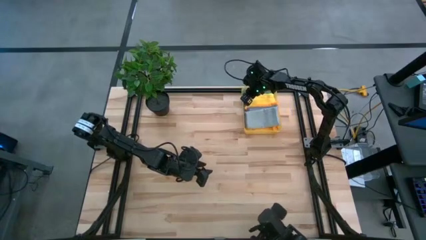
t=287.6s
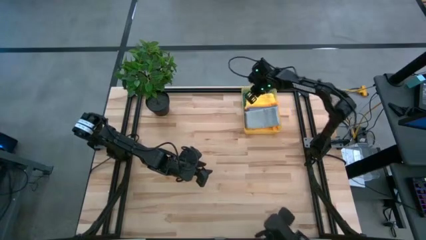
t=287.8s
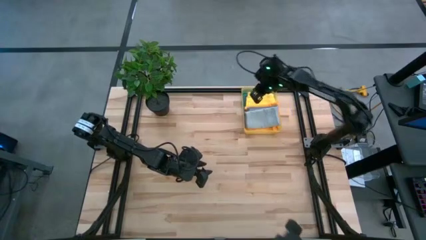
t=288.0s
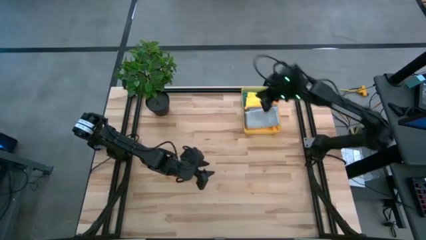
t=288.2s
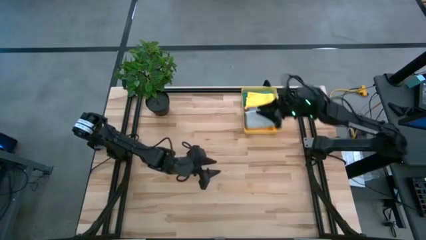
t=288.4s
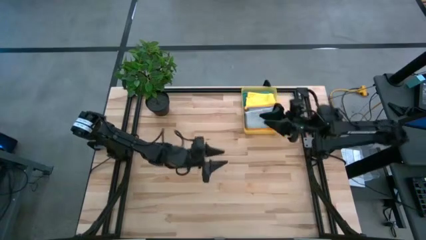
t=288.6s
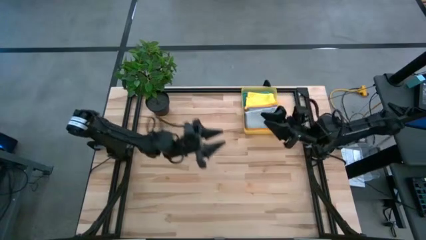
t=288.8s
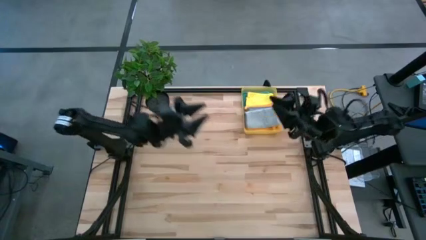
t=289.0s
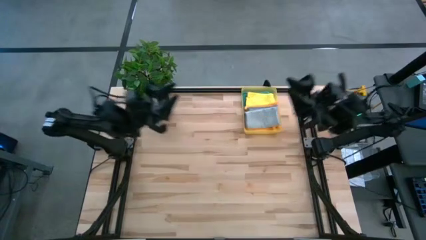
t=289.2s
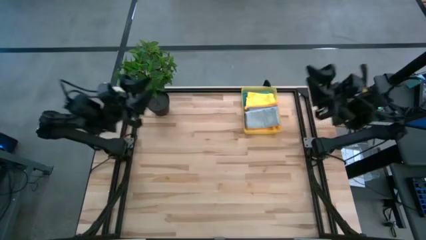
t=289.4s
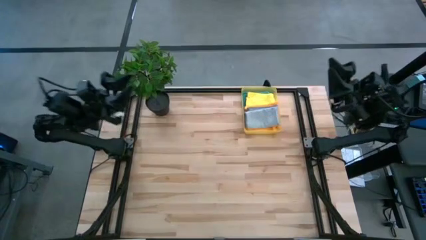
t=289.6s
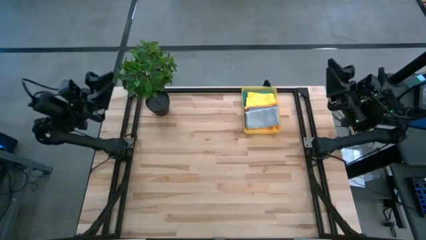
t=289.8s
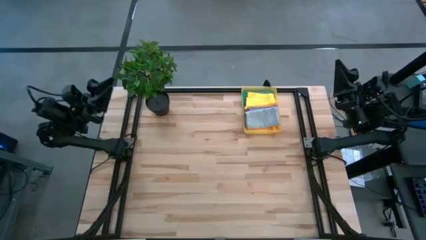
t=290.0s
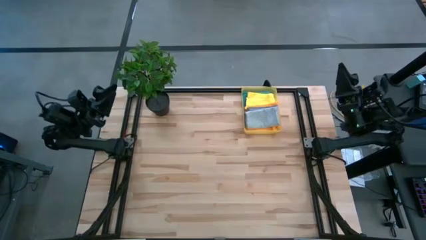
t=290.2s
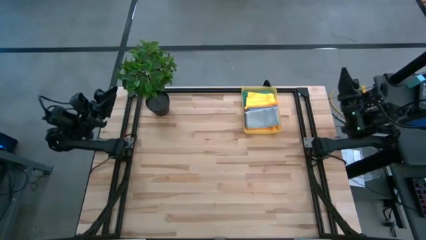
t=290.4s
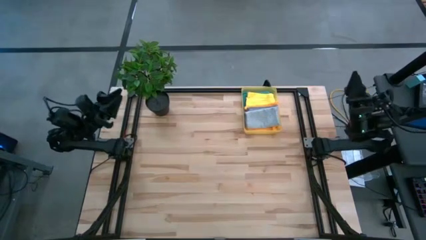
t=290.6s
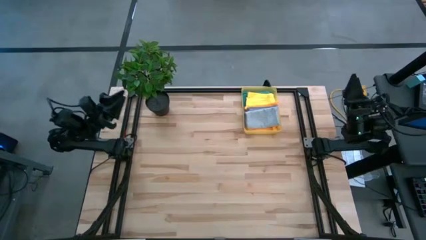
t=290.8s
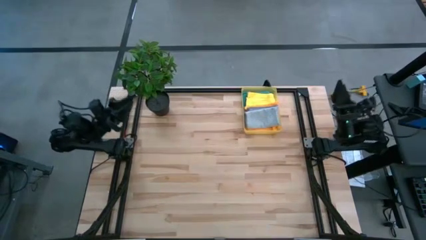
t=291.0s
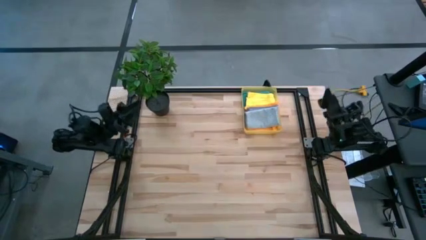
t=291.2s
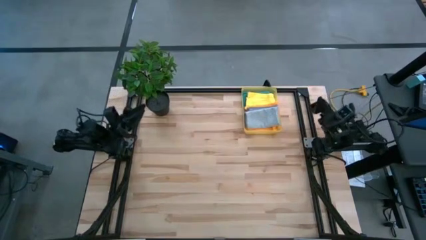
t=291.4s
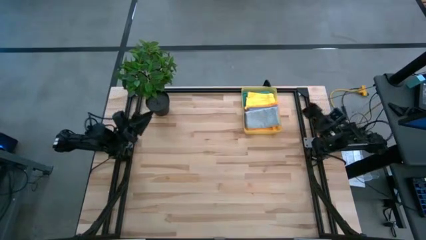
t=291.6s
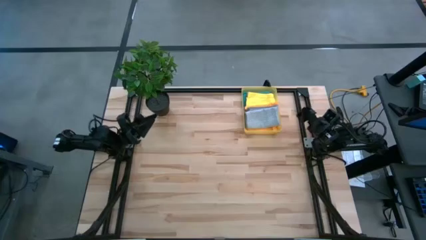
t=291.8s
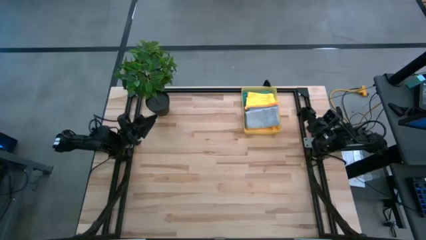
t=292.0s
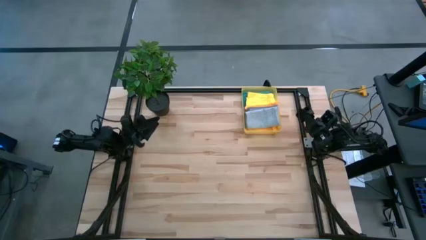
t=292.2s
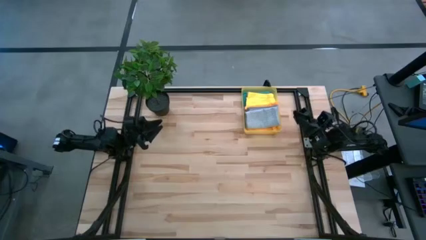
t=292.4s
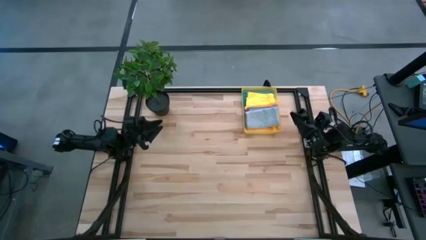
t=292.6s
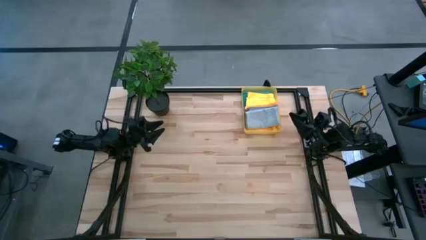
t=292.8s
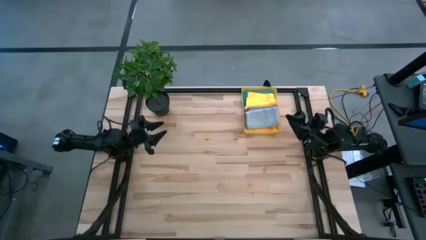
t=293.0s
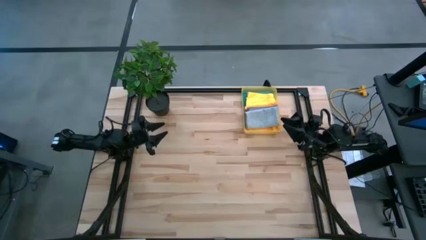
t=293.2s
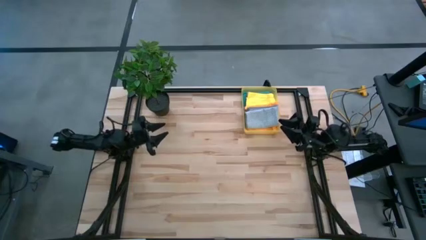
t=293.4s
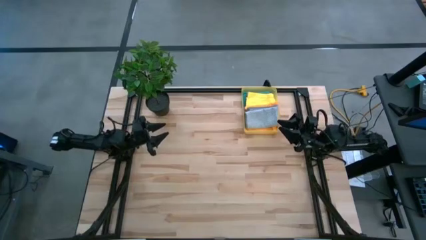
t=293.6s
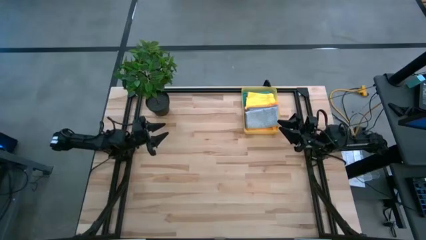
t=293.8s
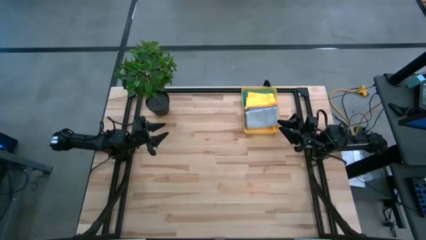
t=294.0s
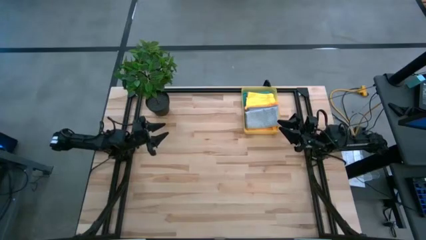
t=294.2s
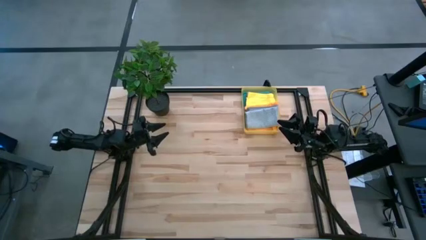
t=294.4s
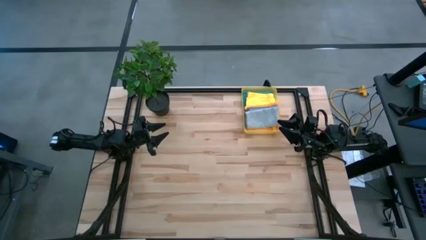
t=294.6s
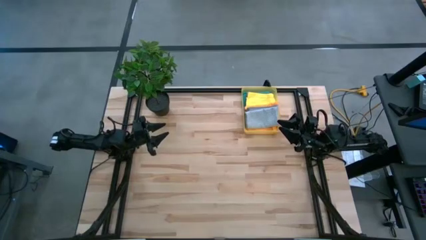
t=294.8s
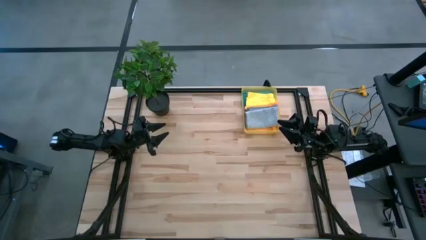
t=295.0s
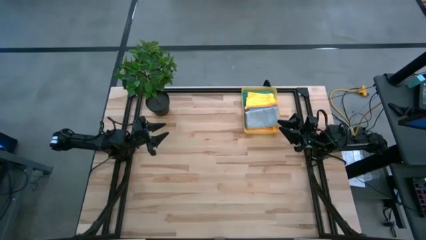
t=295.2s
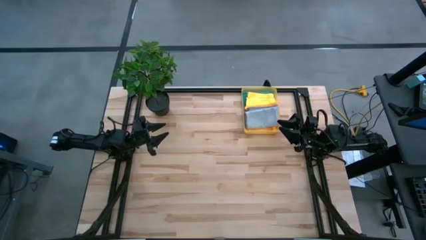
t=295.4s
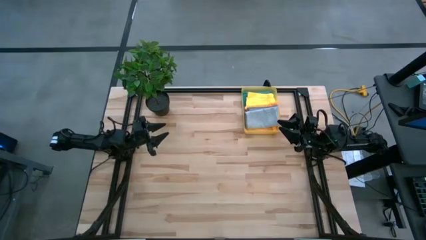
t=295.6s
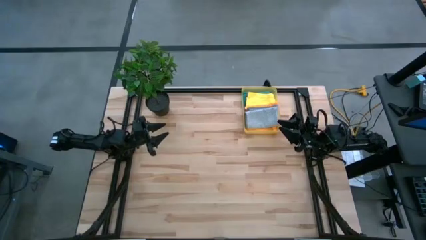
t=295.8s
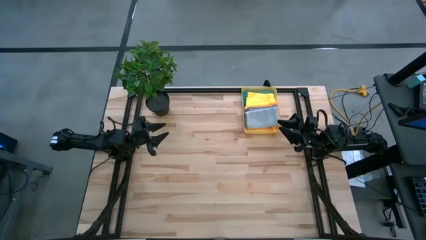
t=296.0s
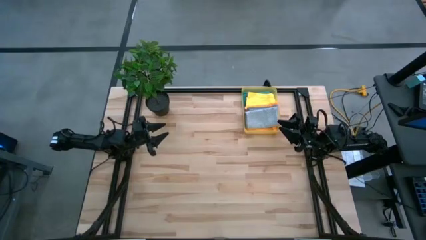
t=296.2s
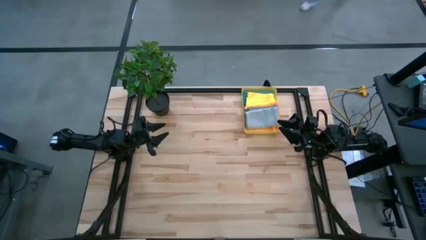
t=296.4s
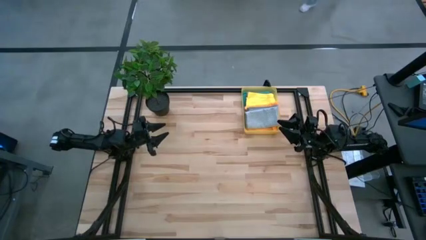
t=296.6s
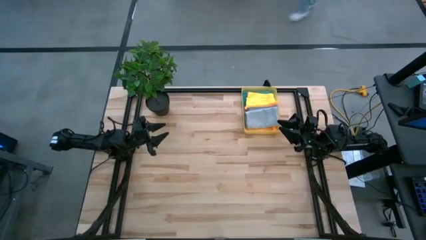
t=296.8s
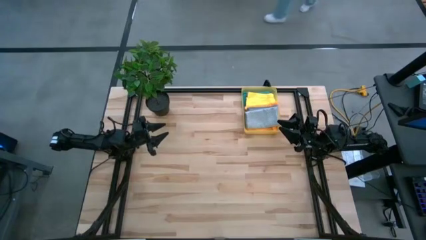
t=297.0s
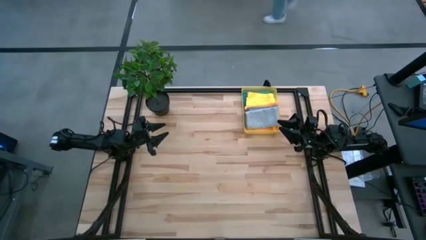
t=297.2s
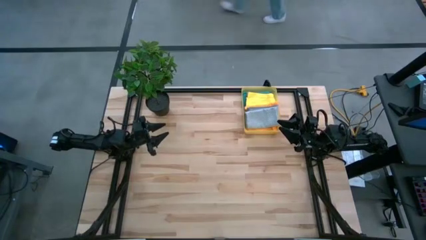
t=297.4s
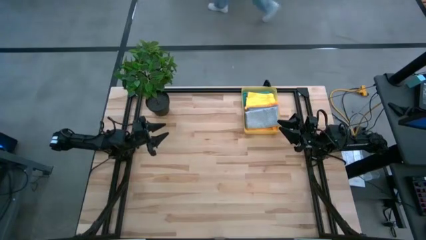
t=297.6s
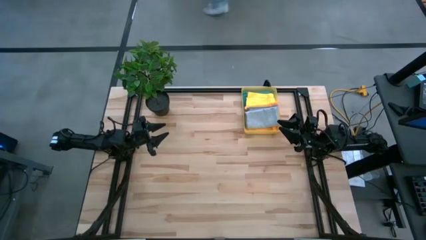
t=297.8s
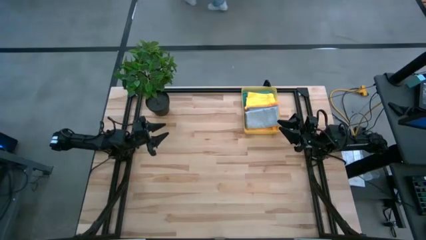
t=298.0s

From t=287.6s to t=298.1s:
Task: Fold microfiber towels
Return to Home Position

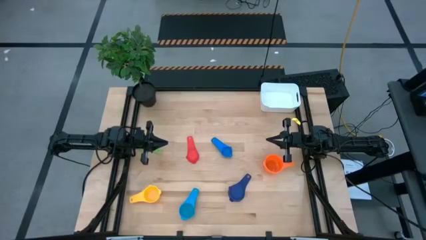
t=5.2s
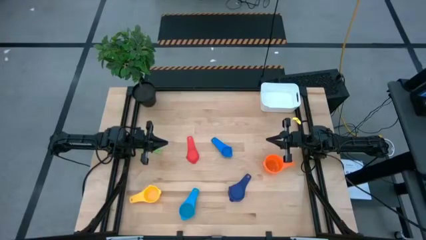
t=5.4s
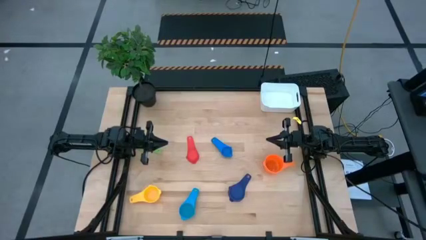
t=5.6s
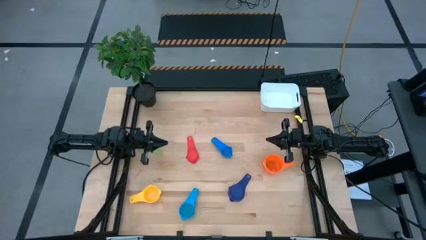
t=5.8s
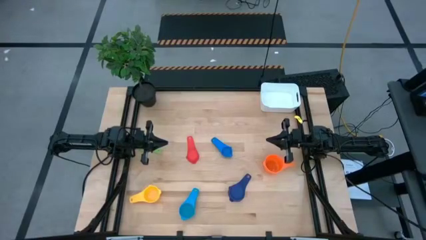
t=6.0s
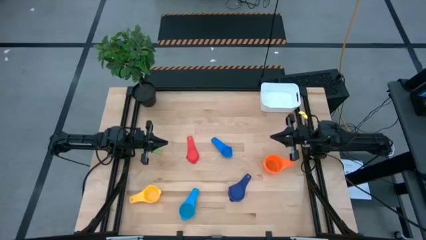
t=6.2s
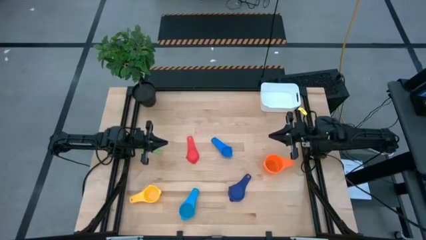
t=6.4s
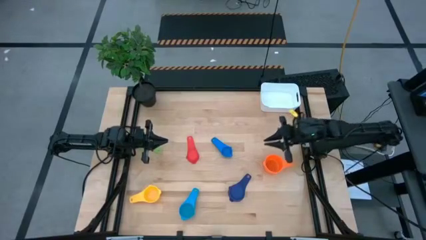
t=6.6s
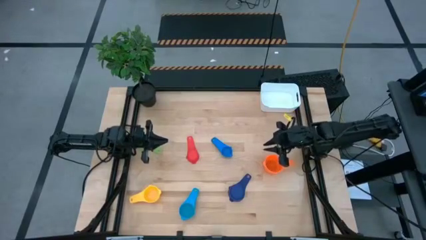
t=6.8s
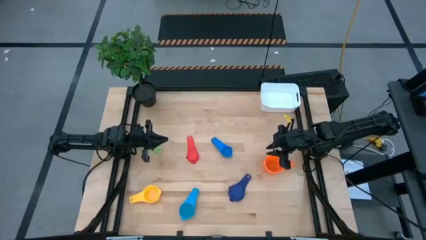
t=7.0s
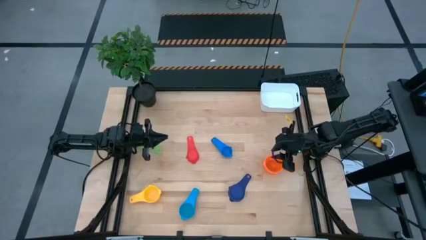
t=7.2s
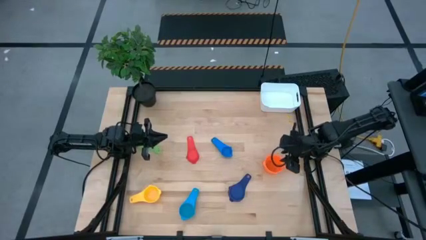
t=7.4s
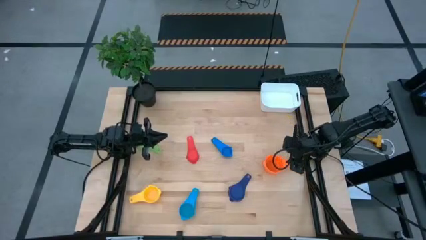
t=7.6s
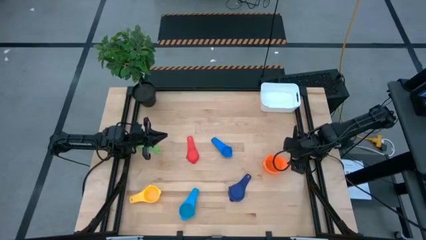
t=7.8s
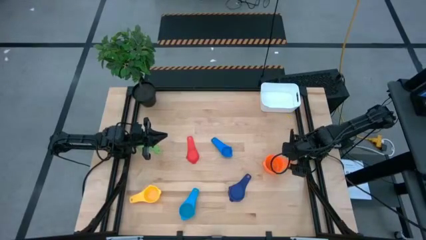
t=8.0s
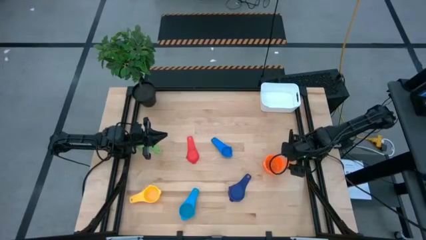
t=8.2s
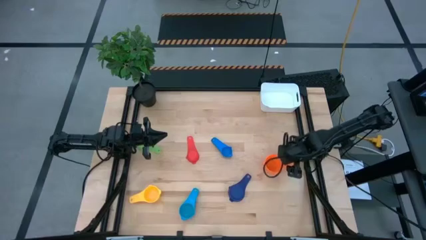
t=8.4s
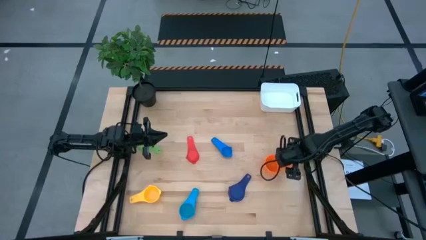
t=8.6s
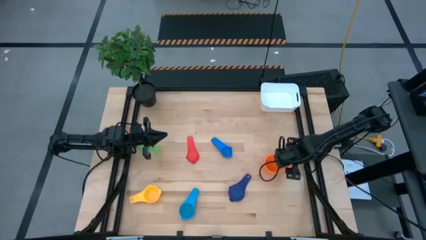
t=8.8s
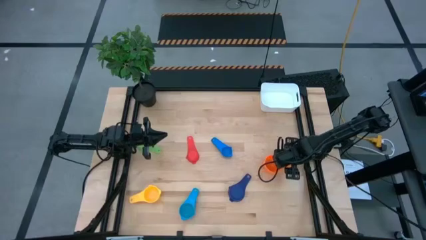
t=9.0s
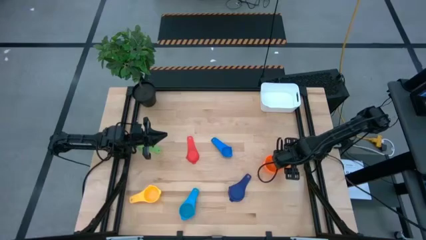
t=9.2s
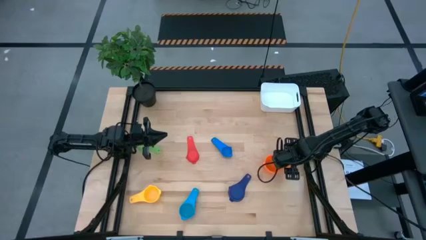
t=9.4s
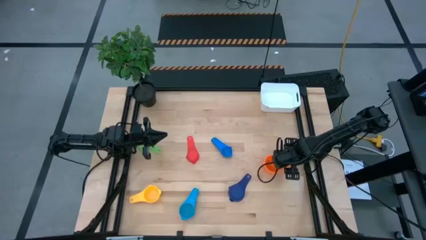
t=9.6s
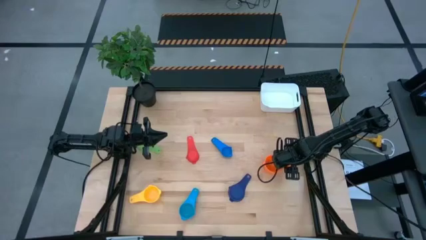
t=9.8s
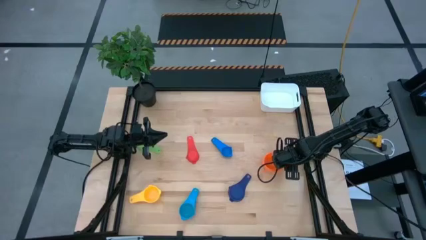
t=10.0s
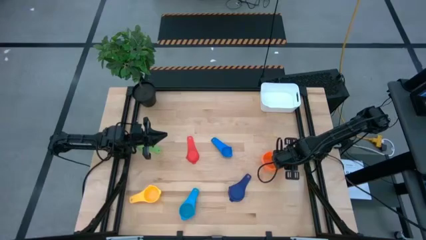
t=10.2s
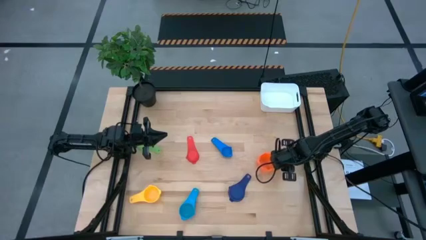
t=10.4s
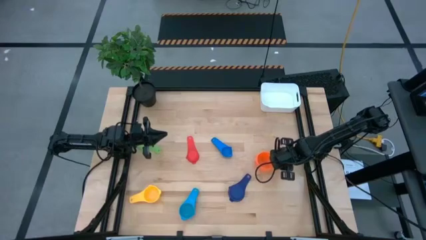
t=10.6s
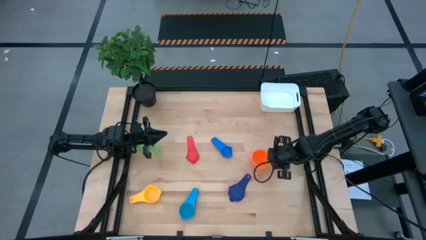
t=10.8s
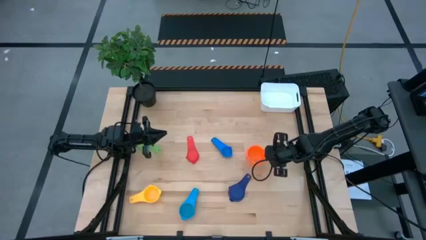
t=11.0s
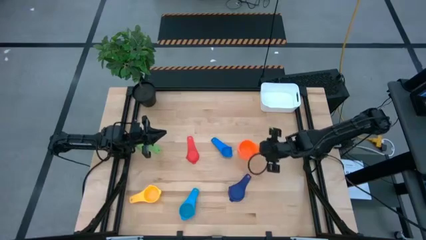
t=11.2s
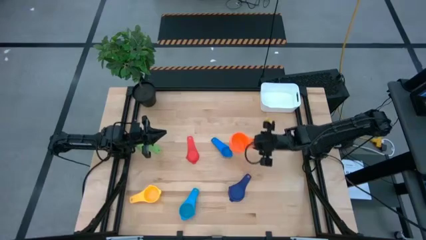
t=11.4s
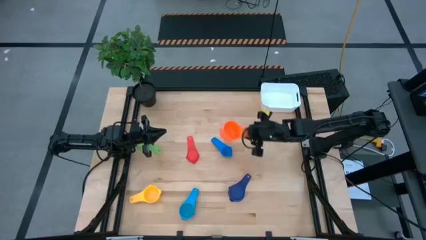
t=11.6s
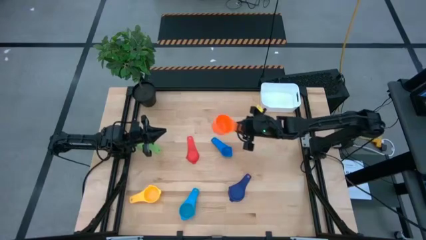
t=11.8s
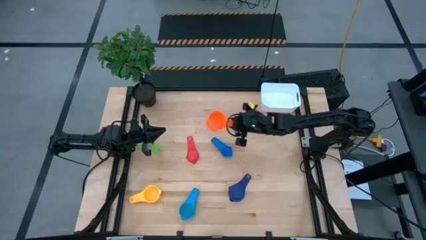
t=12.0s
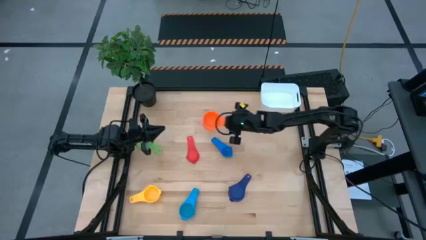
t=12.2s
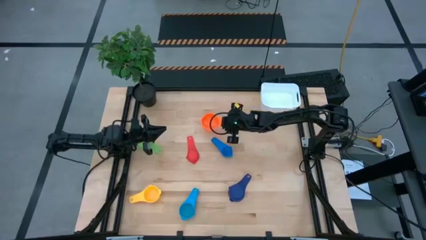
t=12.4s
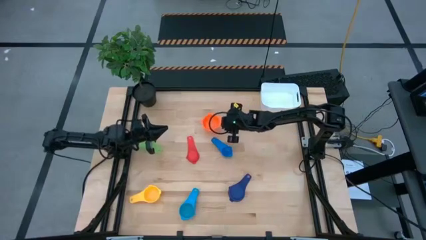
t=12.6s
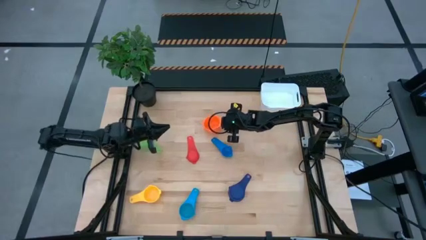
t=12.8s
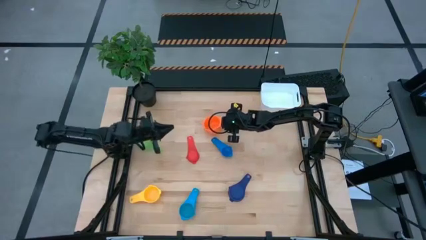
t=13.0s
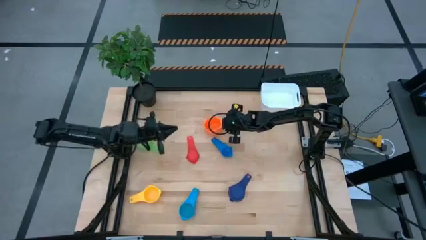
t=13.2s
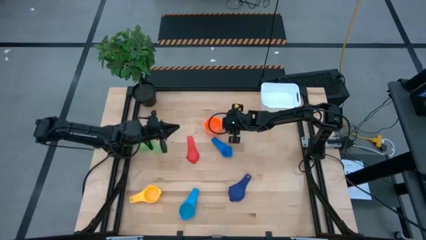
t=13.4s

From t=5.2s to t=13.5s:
Task: Nest measuring cups in basket
Prepare the orange measuring cup
